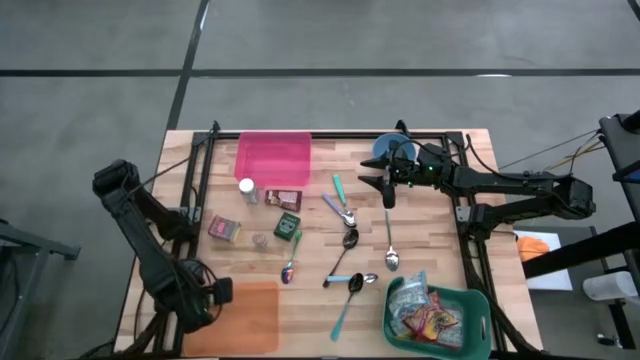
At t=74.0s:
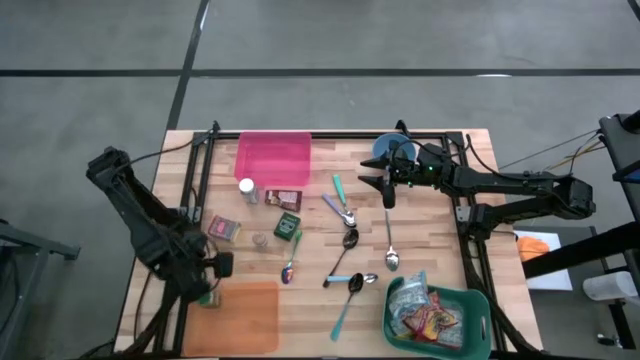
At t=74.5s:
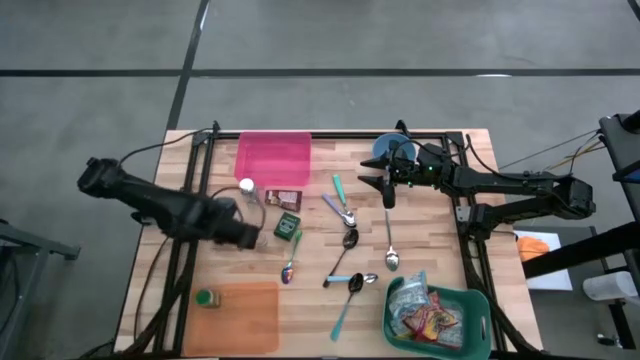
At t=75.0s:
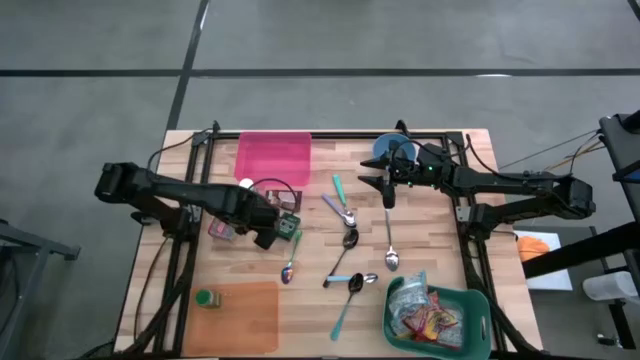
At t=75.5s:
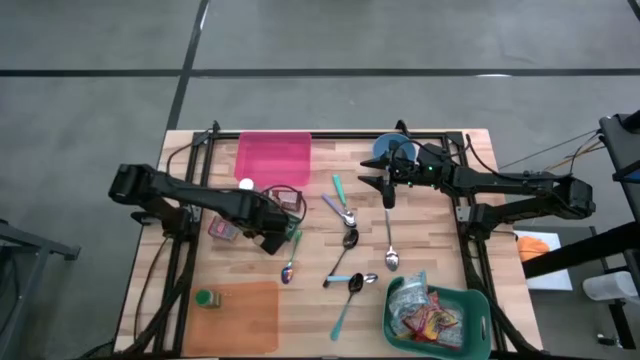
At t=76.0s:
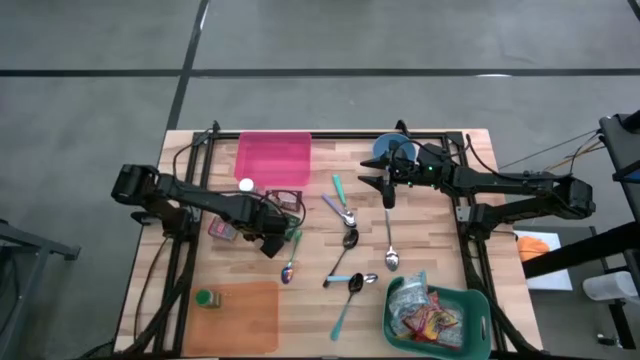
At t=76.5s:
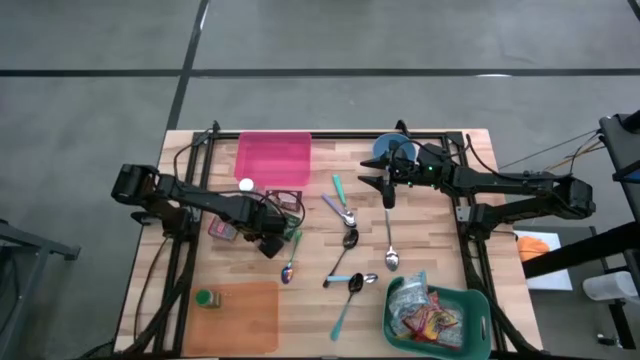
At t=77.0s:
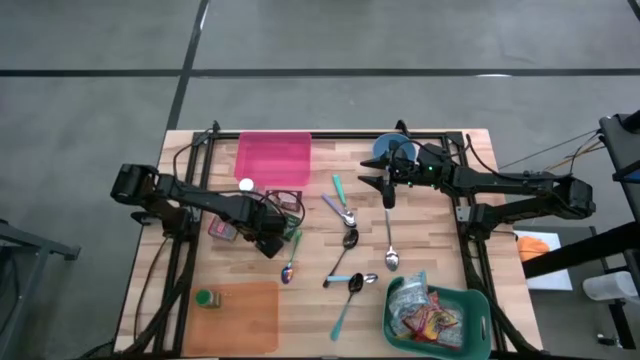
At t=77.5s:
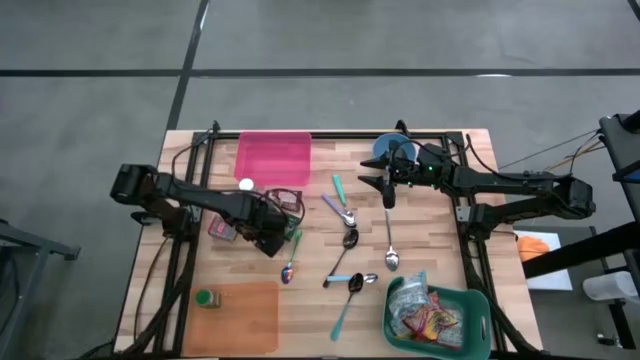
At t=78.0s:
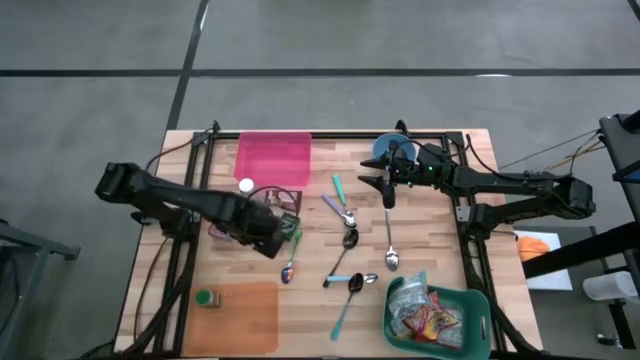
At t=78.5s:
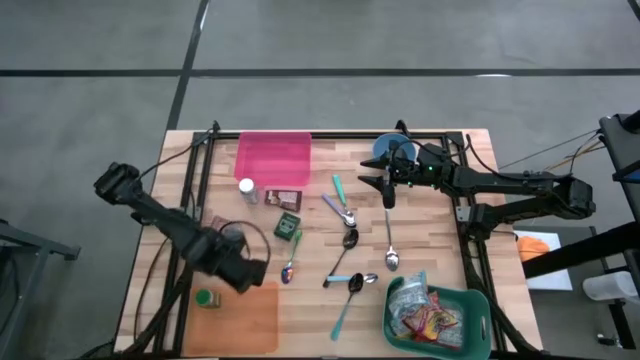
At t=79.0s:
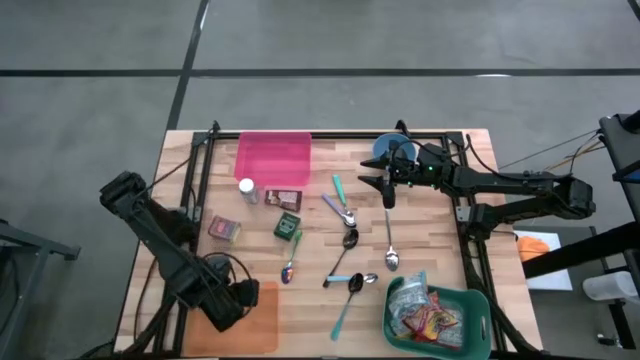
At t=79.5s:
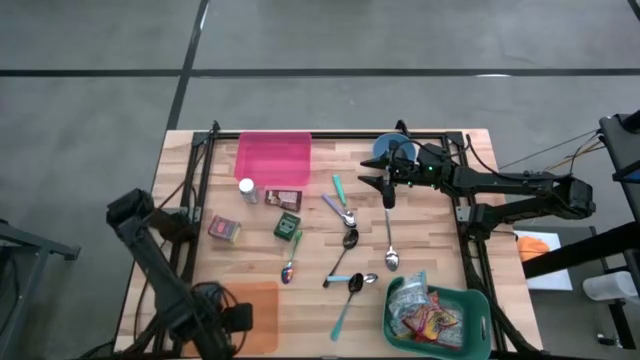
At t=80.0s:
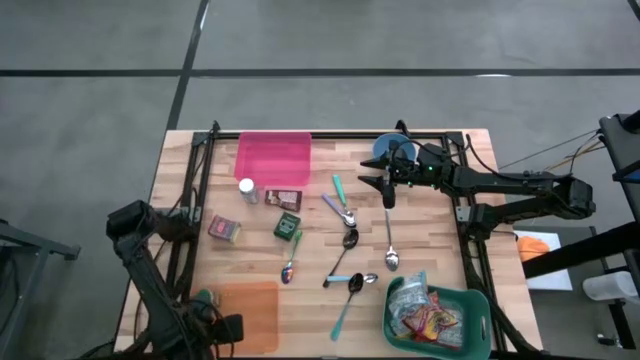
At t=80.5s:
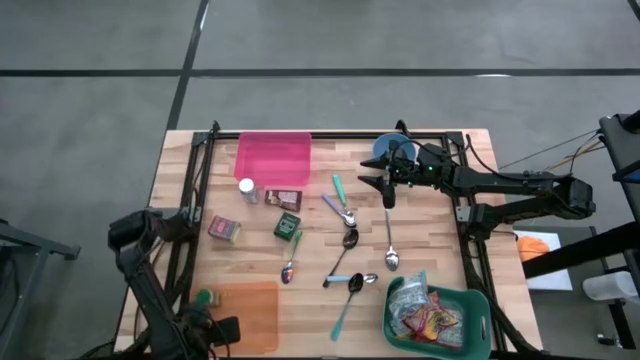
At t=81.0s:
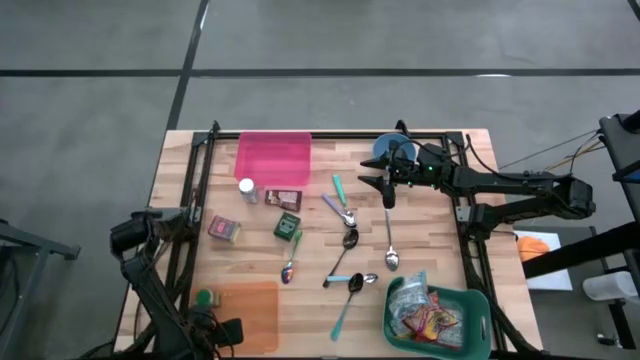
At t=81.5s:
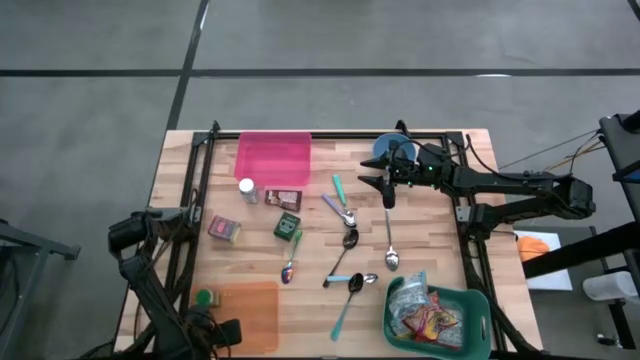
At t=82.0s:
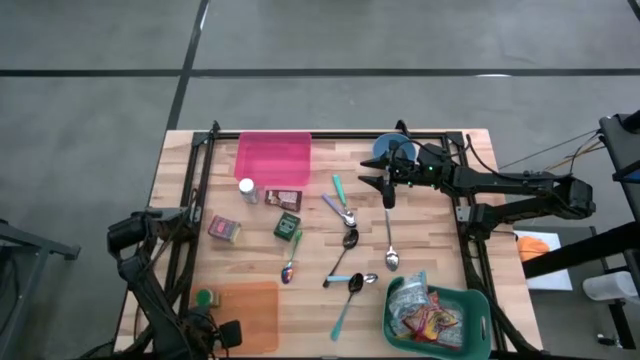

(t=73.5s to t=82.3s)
Put the brown seasoning bottle into the orange bin

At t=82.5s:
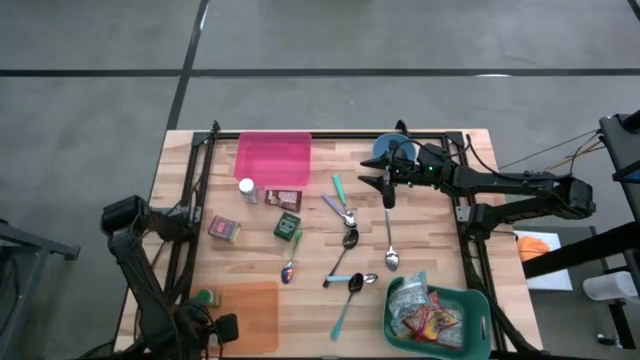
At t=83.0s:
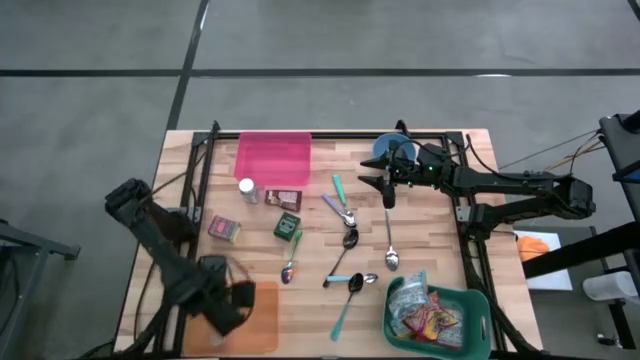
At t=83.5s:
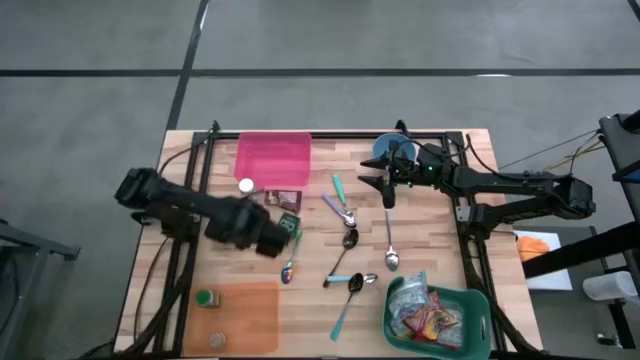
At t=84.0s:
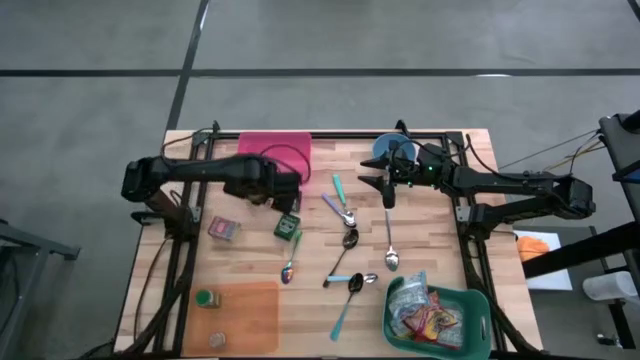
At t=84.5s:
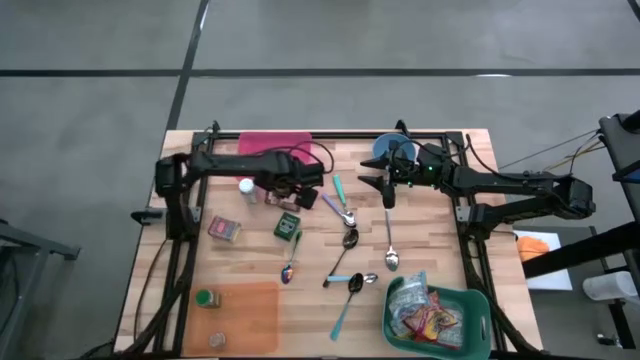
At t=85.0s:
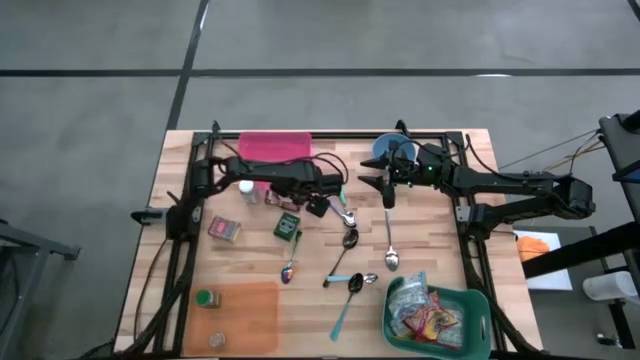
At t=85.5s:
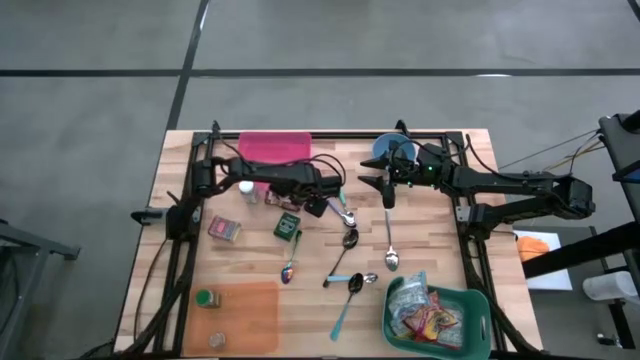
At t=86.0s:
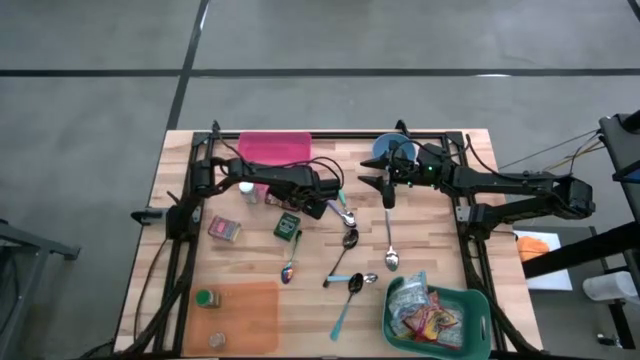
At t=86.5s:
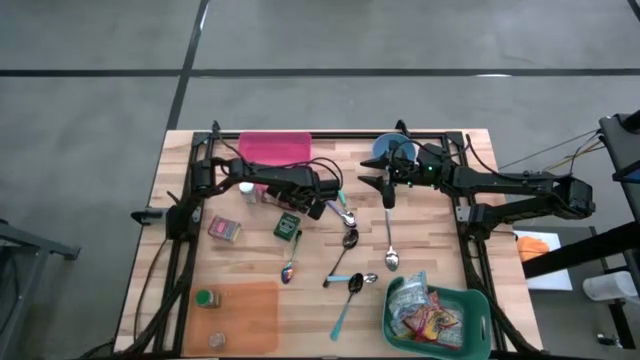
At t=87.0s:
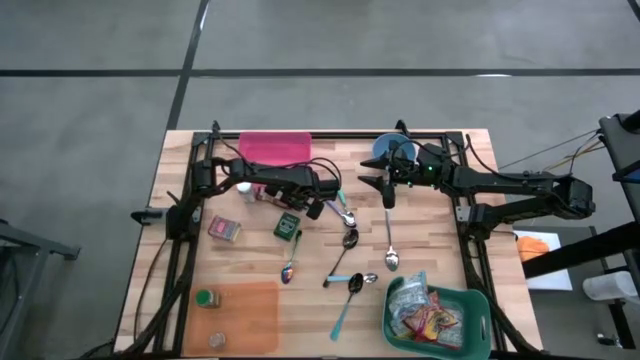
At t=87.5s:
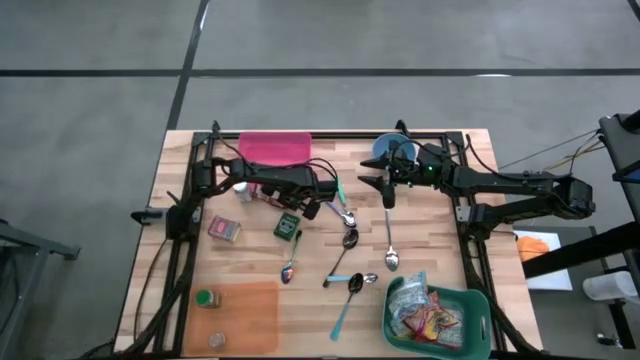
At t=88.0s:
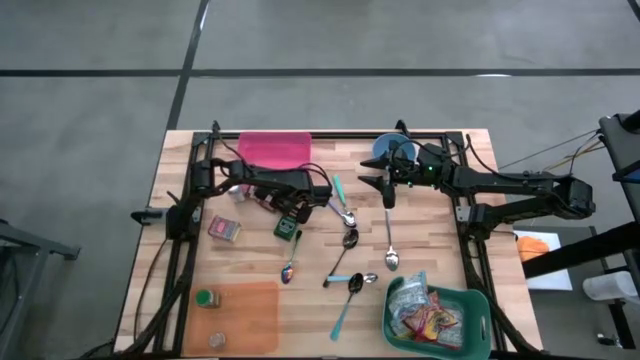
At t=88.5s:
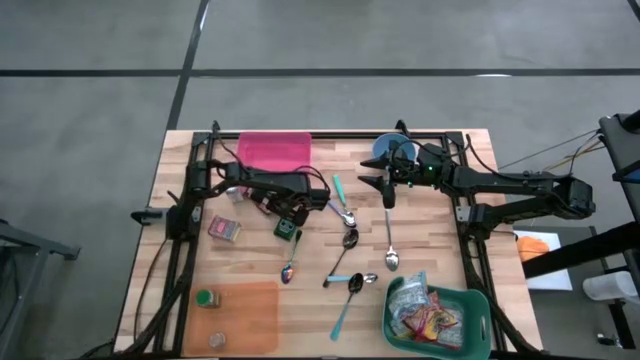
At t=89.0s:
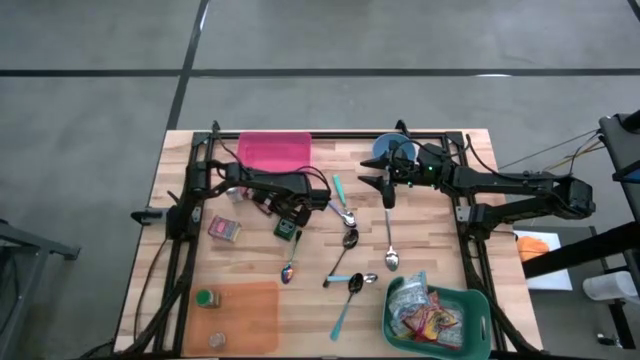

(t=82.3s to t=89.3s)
Put the orange seasoning pack into the orange bin

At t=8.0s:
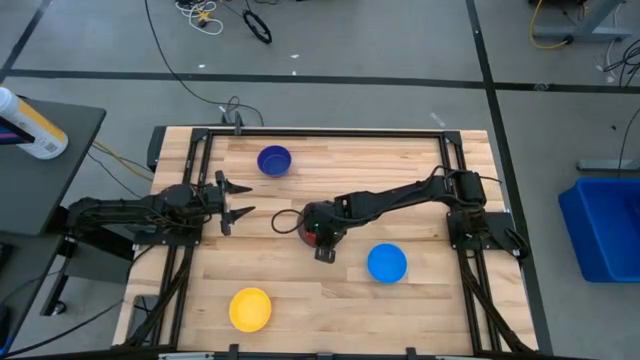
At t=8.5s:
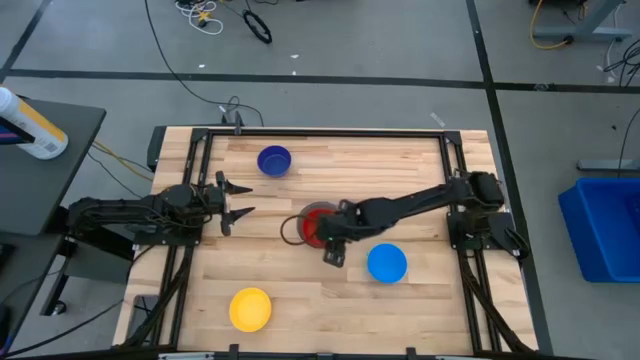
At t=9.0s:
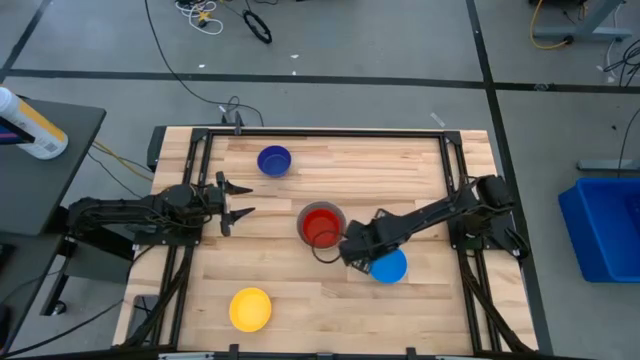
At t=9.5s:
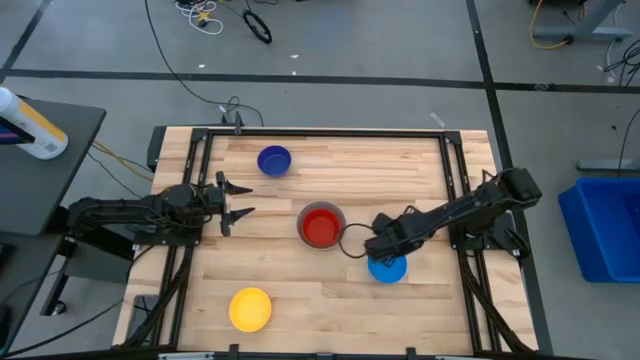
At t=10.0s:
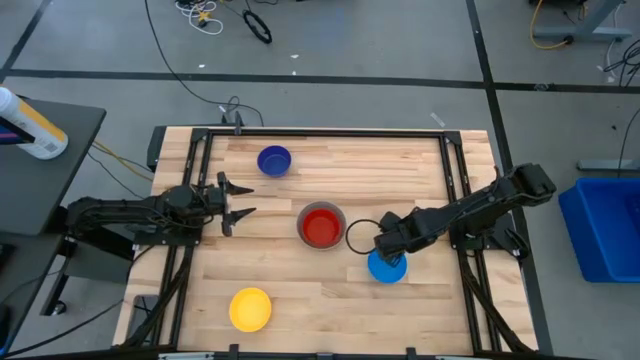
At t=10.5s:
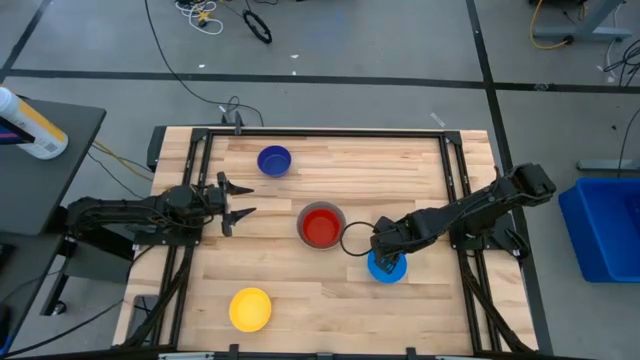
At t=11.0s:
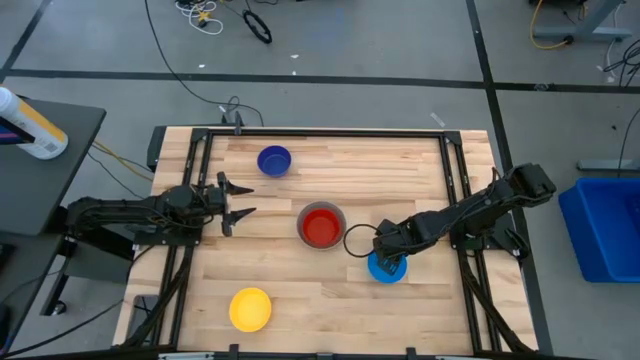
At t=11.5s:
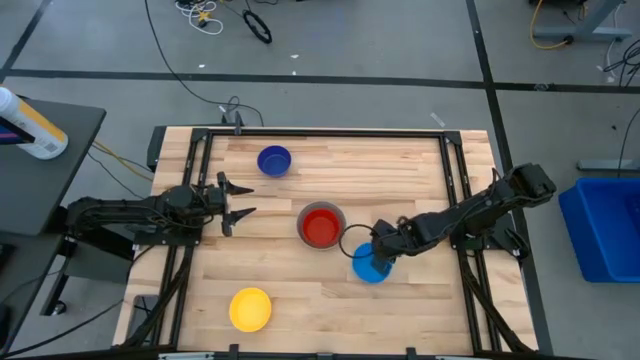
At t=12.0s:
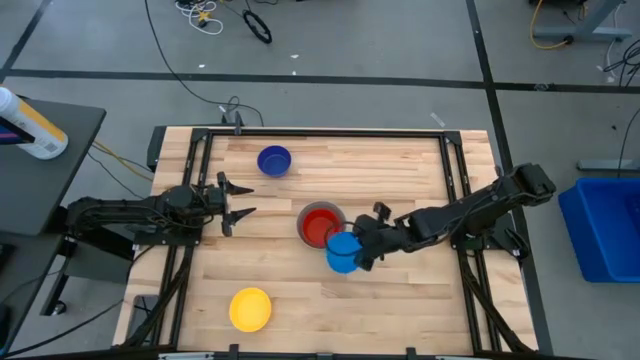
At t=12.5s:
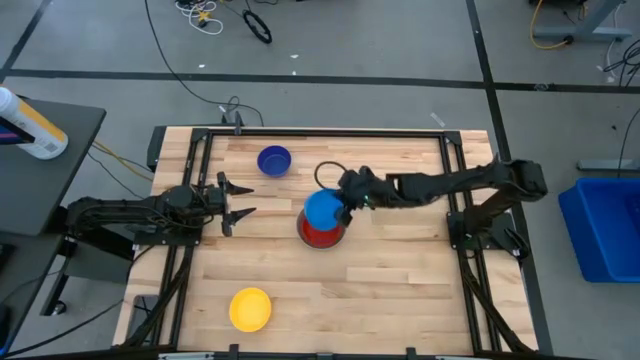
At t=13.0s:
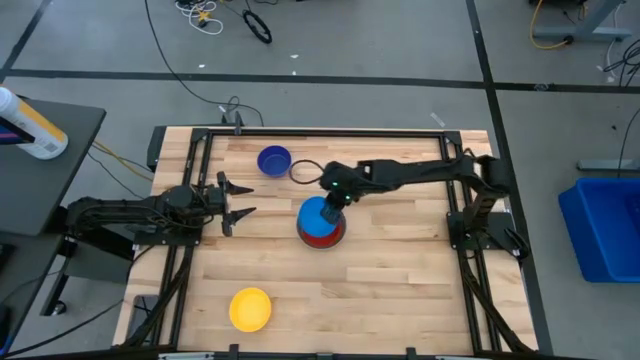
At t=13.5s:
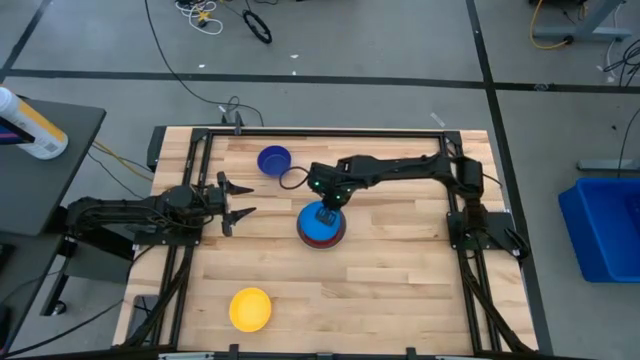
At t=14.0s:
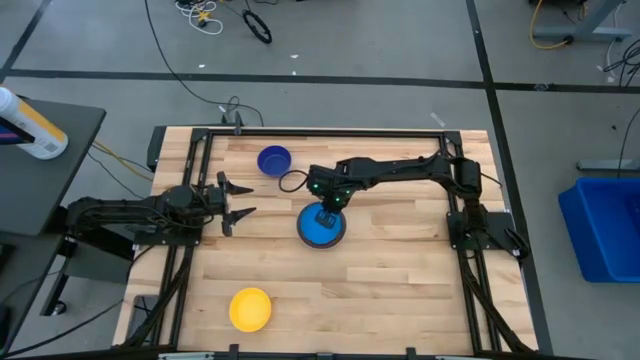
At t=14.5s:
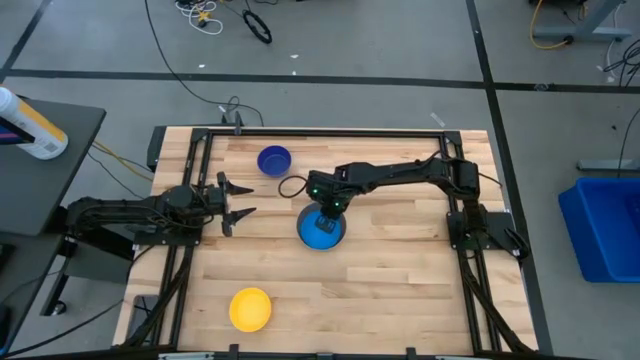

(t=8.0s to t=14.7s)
Stack the blue bowl on the red bowl
